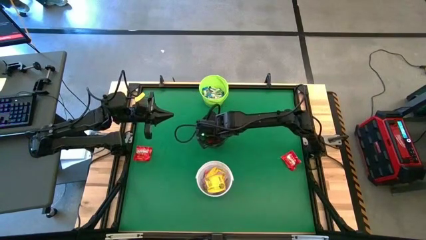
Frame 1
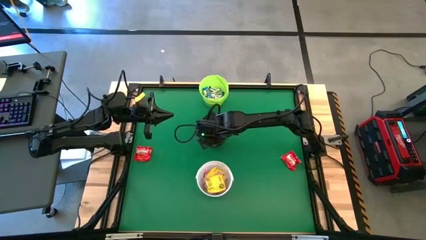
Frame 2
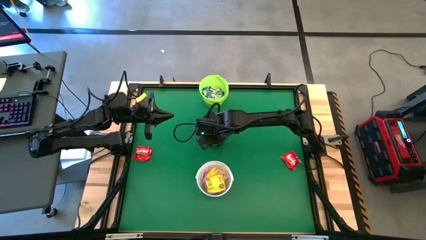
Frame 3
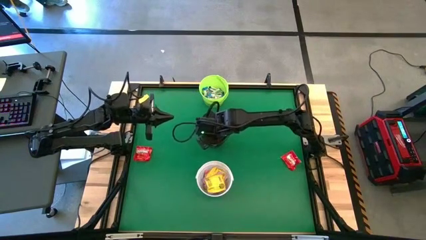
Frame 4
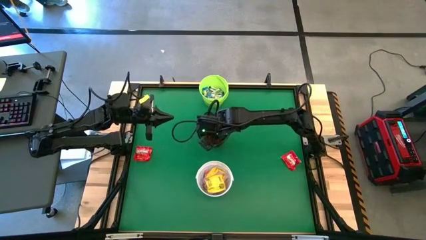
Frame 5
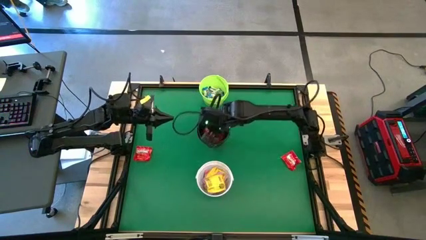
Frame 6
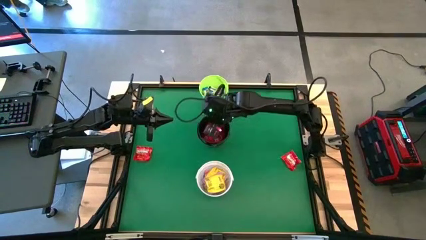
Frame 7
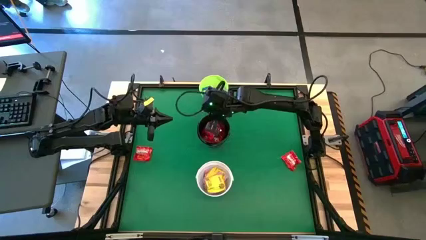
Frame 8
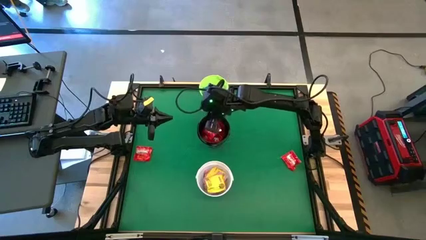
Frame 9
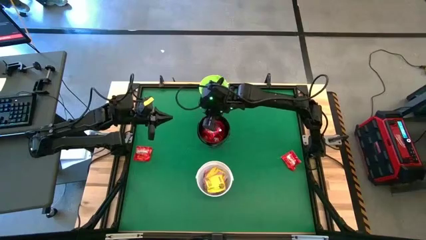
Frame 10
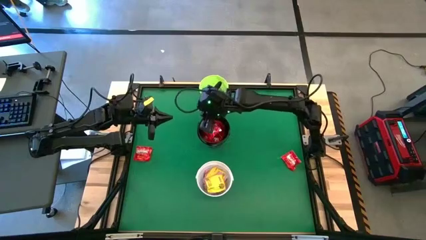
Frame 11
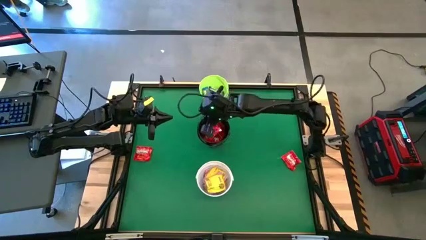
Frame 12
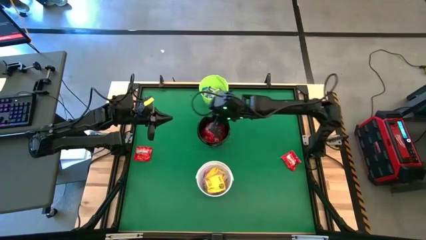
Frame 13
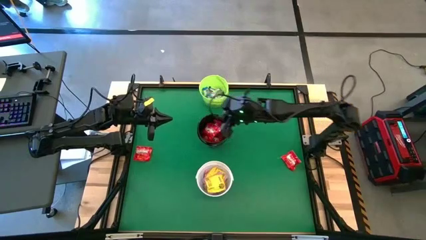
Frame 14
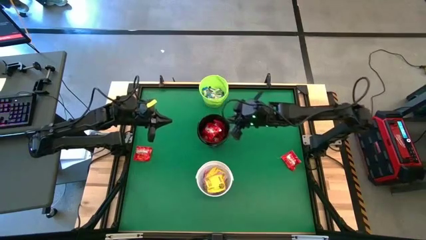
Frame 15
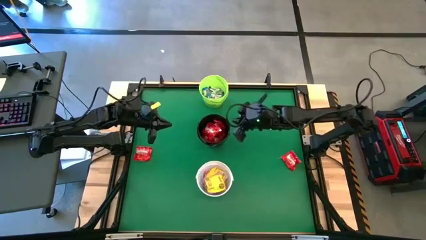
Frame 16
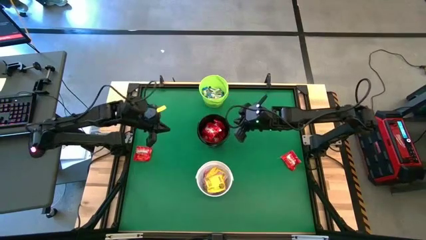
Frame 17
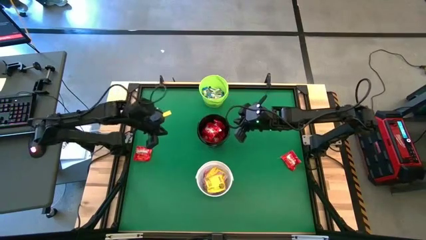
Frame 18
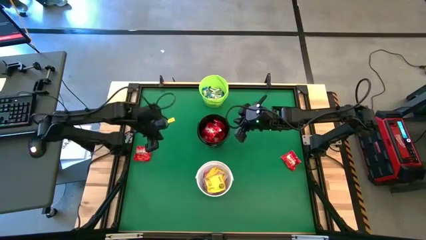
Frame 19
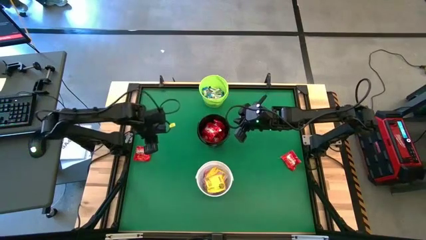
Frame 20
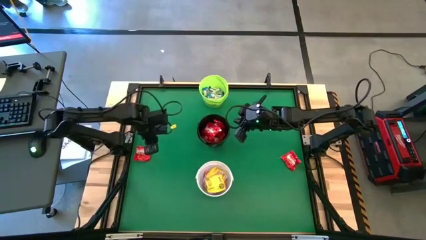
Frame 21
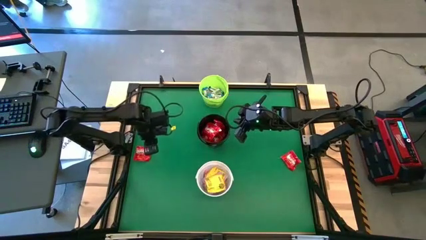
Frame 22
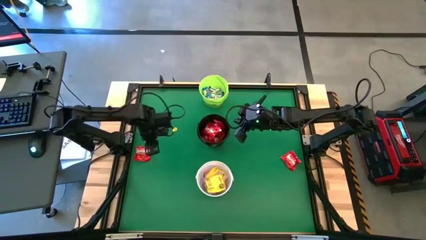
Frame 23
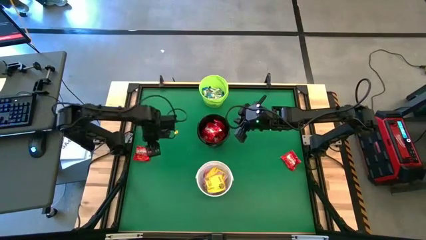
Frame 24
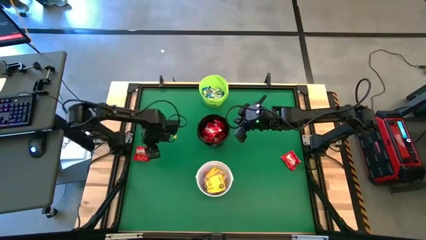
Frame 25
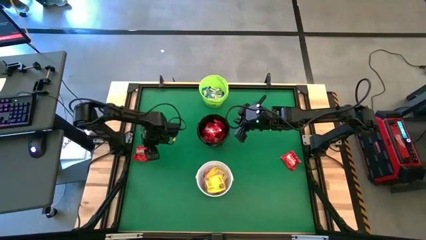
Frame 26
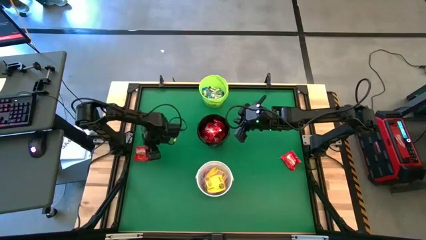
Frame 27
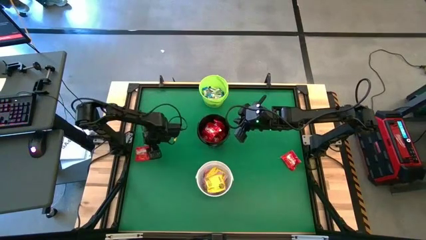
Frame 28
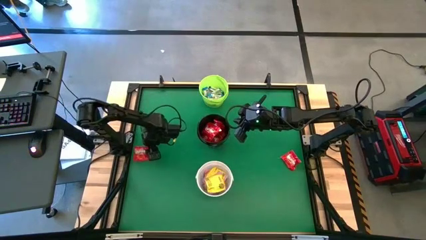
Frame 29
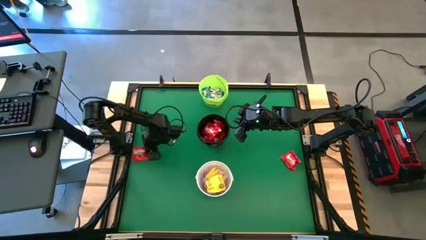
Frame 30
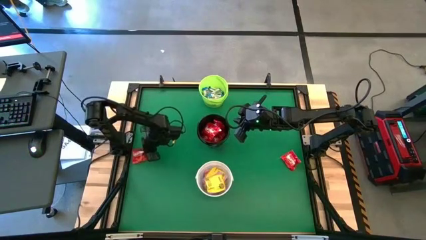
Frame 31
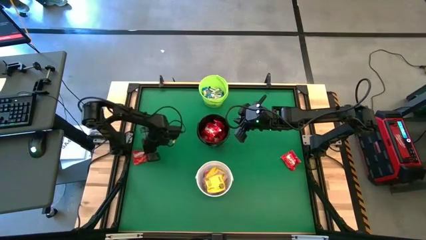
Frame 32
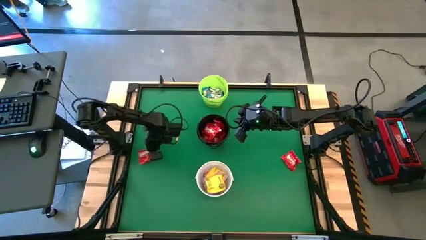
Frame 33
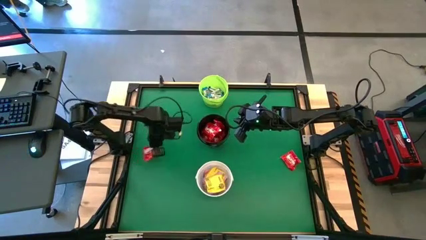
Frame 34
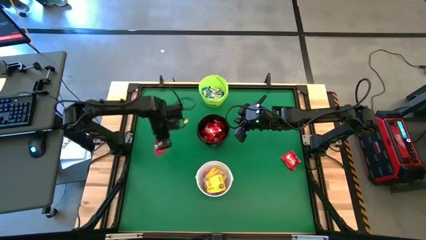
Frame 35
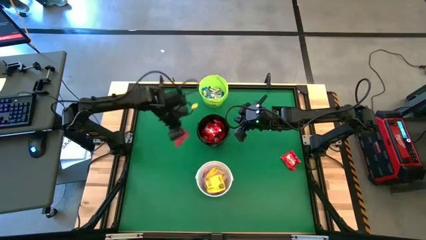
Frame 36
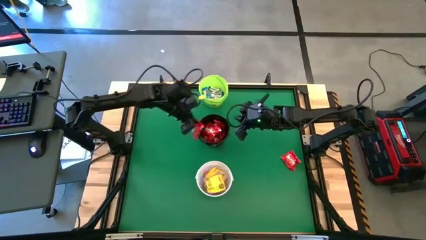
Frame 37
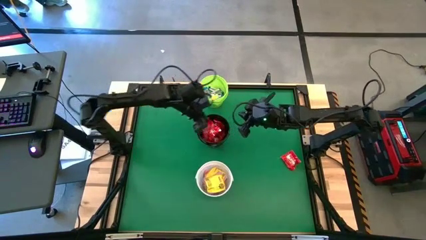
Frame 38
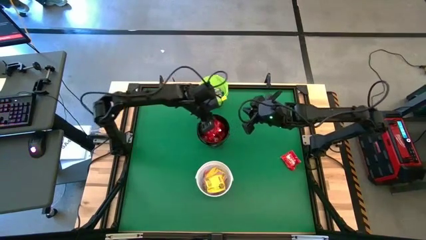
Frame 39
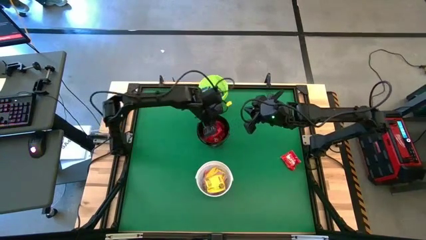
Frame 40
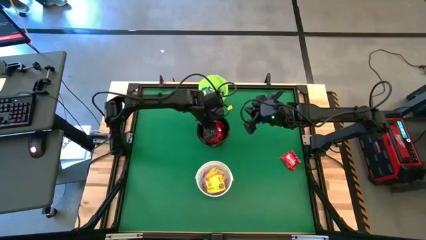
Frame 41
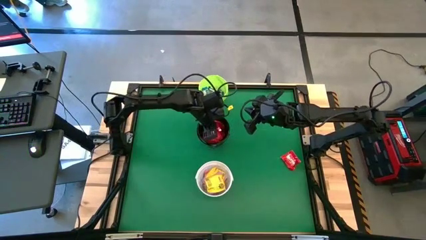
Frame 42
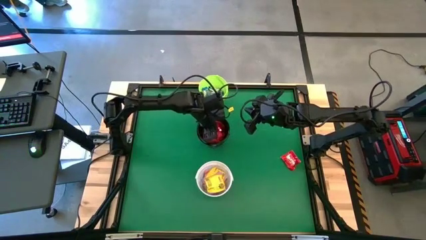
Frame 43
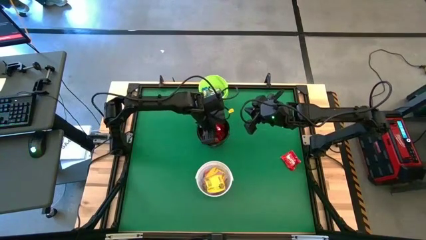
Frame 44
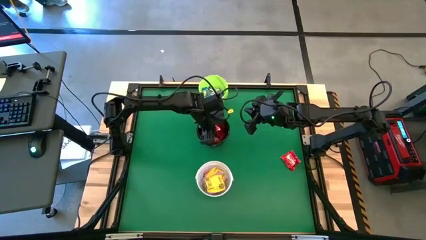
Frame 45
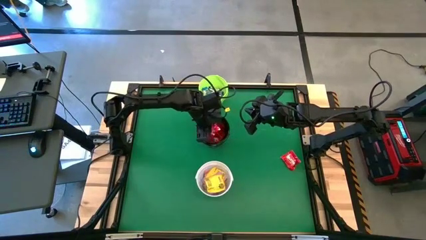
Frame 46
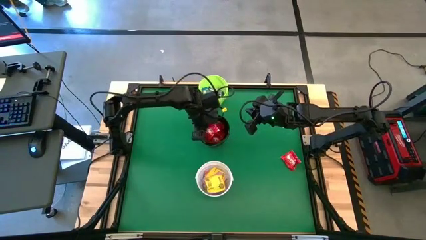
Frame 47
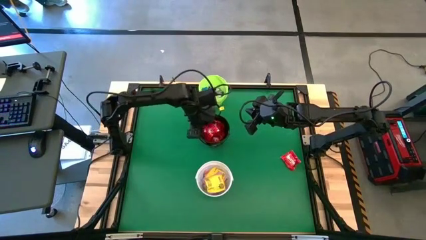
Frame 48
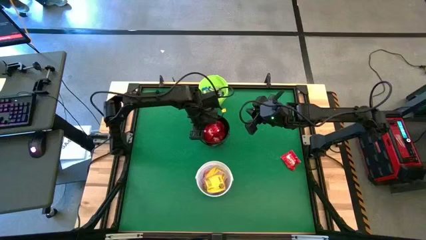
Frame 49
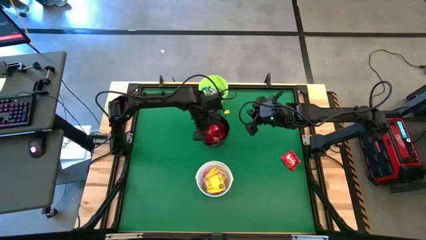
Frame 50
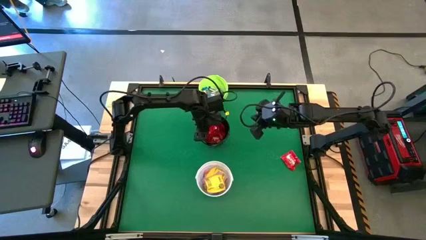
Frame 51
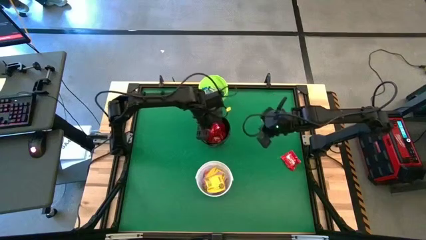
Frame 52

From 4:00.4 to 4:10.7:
Task: Sort candy by brand, put in halloween buckets
Put the red chocolate into the black bucket

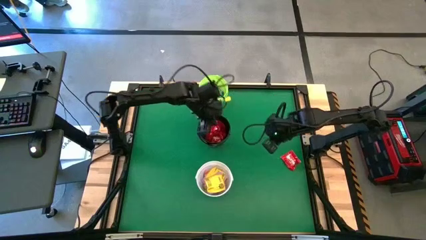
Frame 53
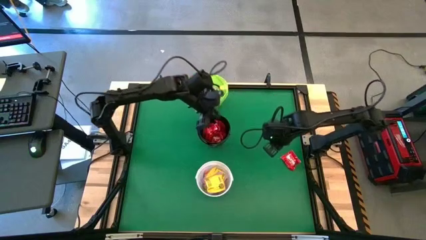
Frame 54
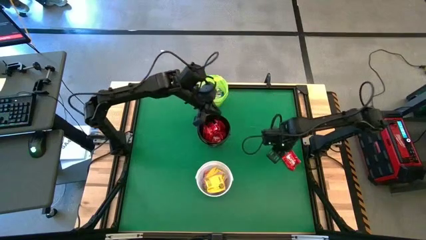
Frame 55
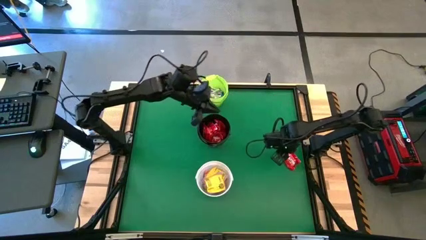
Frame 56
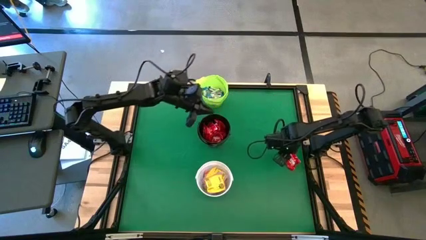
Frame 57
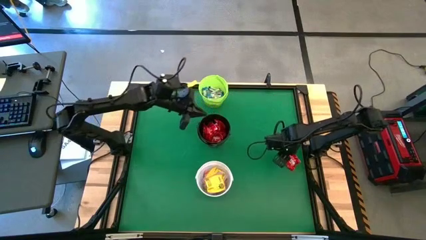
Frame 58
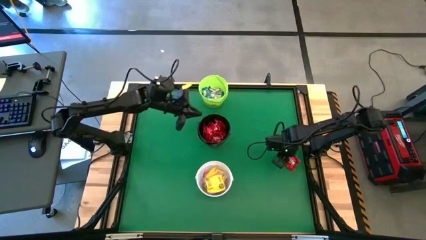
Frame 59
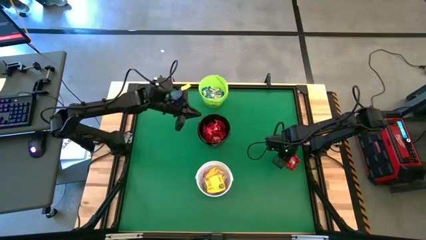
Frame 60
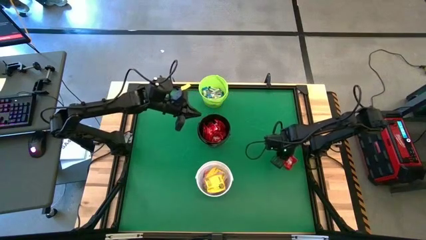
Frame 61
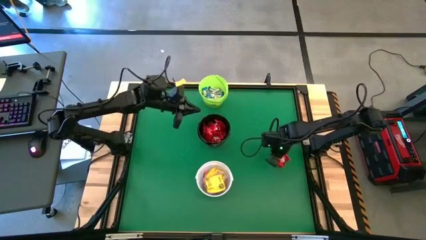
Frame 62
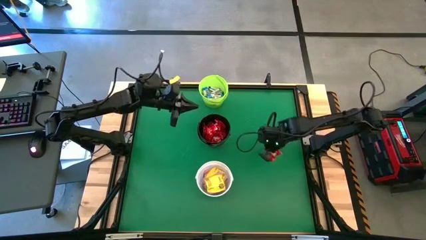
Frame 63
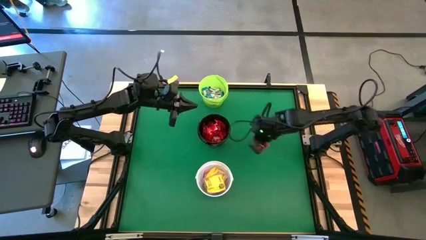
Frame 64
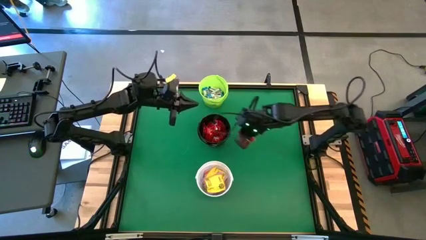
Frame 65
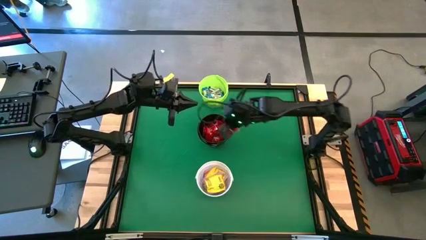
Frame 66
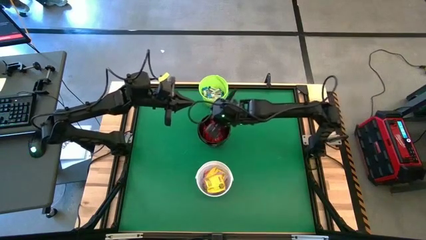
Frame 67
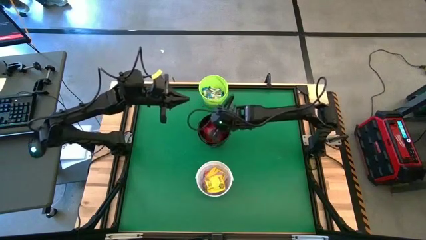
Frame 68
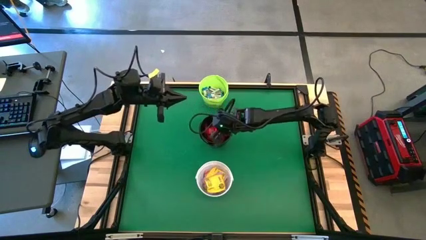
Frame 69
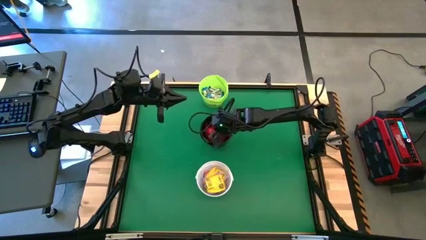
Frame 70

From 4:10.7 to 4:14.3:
Put the red chocolate into the black bucket

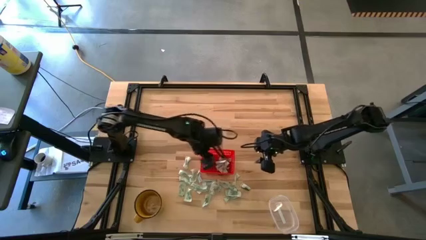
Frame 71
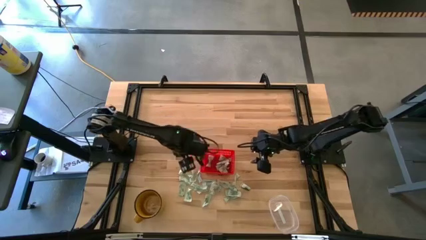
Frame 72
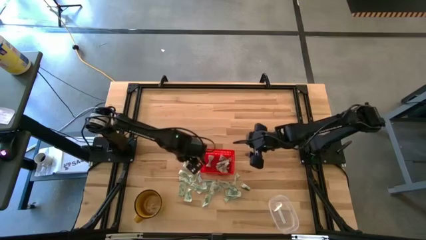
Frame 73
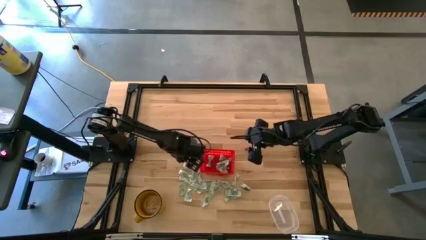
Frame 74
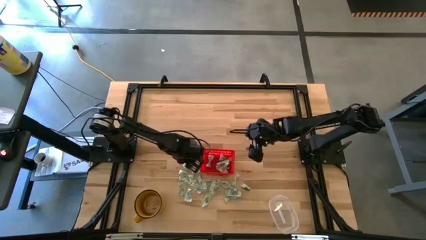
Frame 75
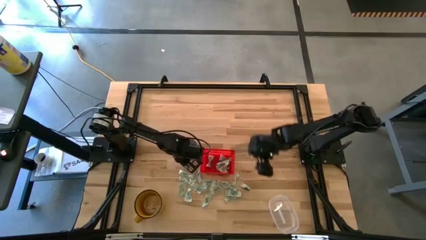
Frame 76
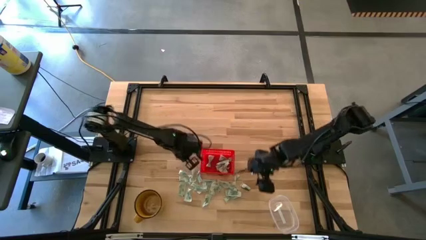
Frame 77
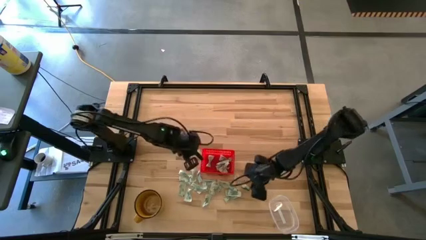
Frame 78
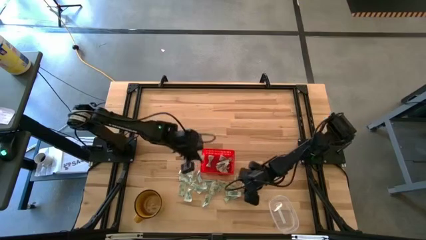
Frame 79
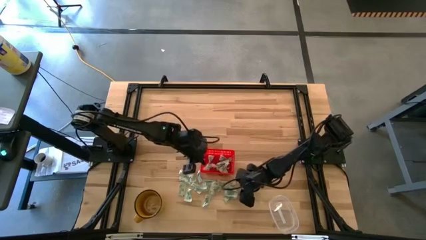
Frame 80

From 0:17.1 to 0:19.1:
Task: Pick and place Stevia / Truvia into bins
Put the stevia packet into the orange basket

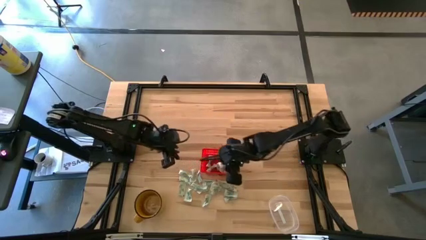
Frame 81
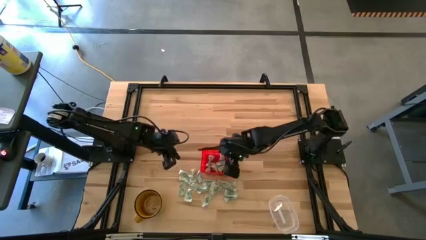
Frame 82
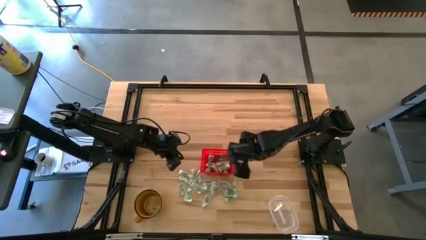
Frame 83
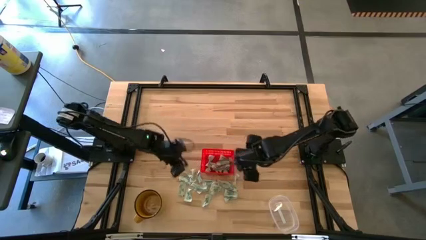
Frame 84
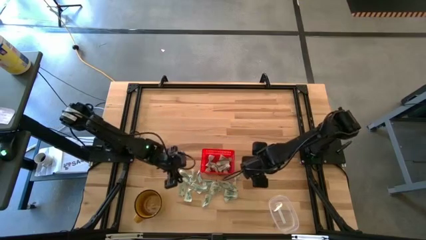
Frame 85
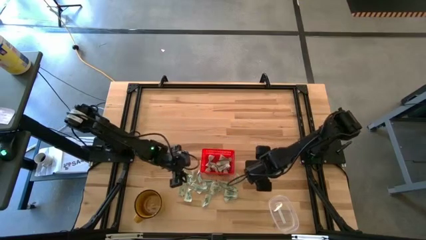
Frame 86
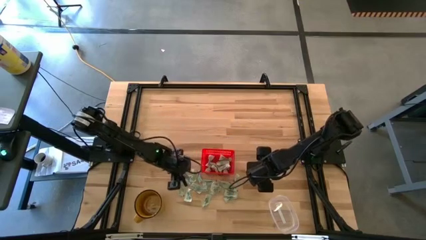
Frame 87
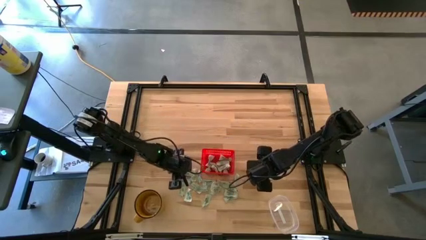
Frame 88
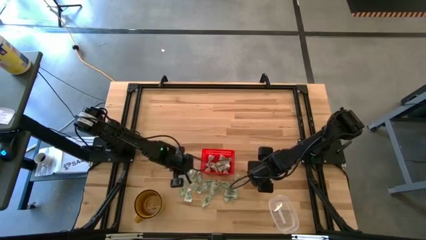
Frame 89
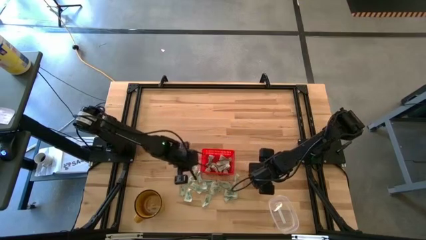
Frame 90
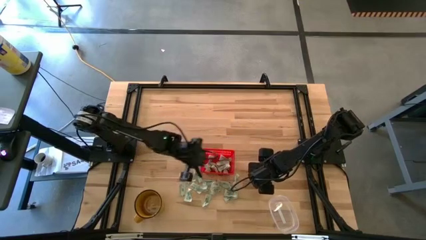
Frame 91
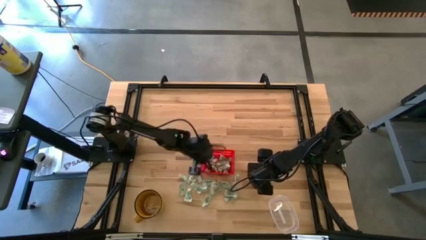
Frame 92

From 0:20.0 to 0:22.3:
Put the stevia packet into the orange basket
